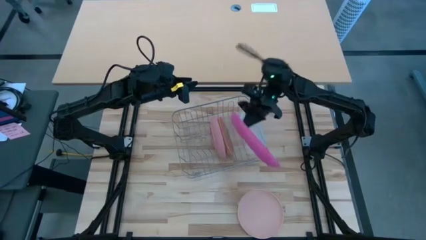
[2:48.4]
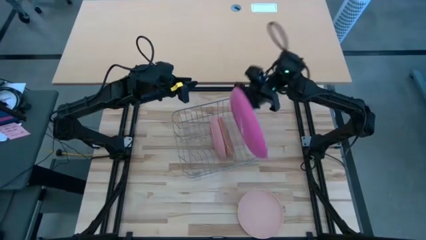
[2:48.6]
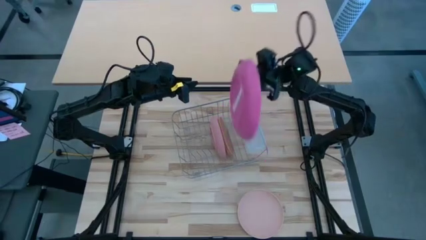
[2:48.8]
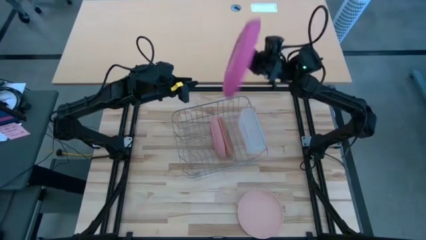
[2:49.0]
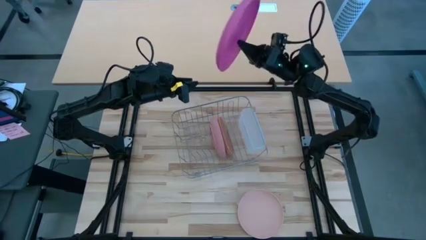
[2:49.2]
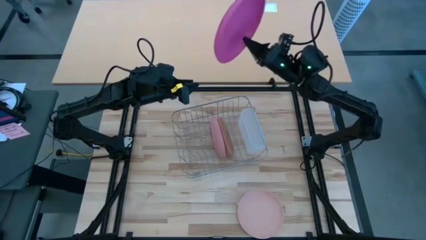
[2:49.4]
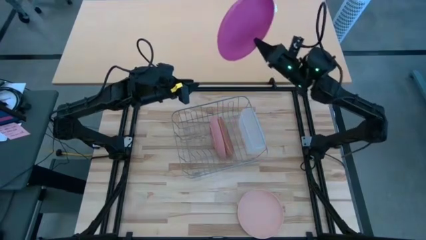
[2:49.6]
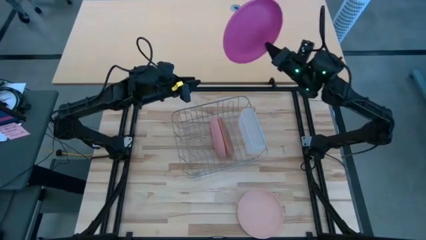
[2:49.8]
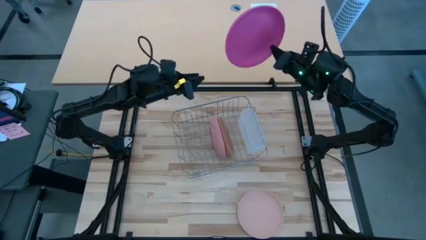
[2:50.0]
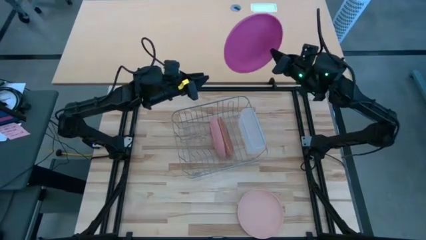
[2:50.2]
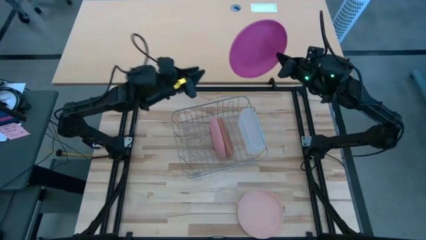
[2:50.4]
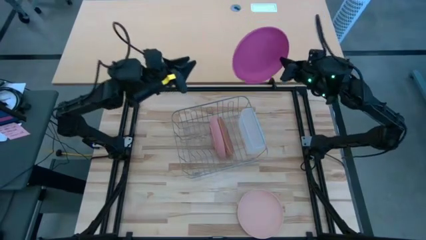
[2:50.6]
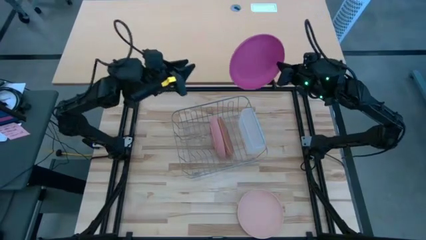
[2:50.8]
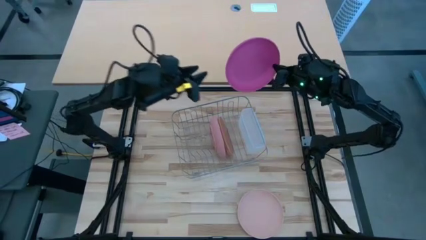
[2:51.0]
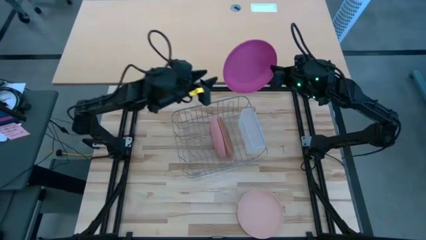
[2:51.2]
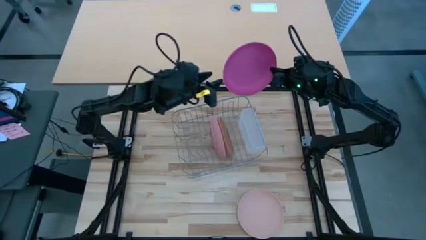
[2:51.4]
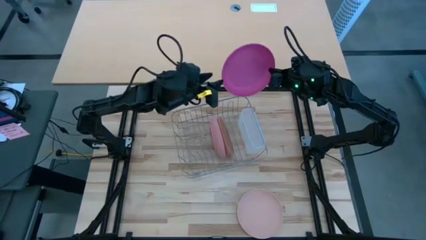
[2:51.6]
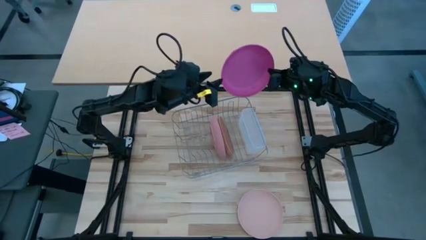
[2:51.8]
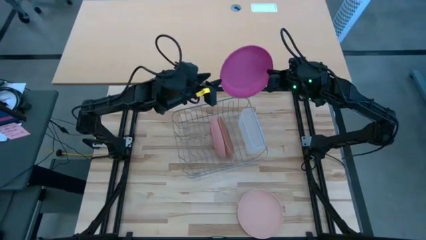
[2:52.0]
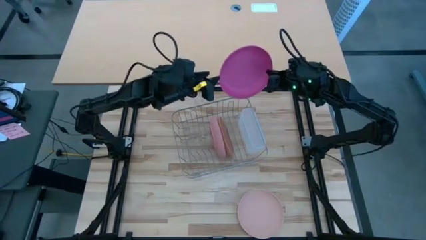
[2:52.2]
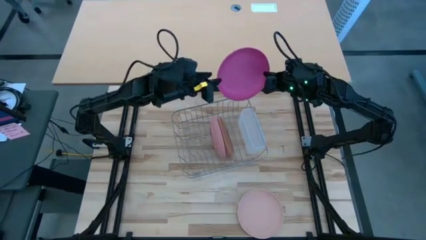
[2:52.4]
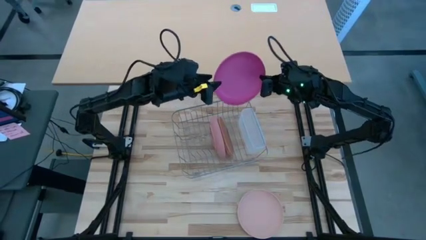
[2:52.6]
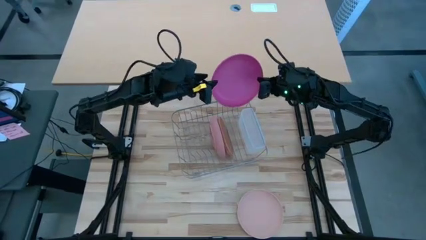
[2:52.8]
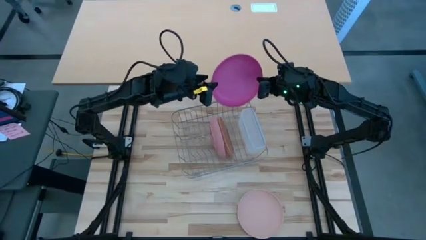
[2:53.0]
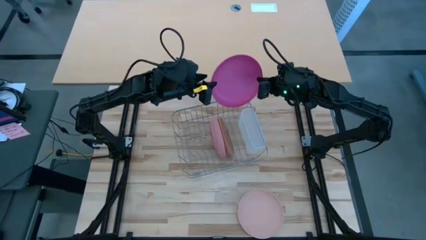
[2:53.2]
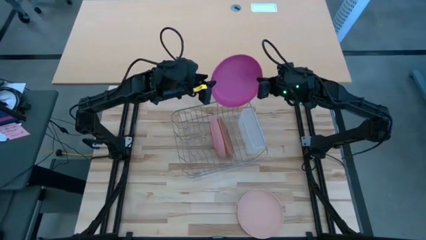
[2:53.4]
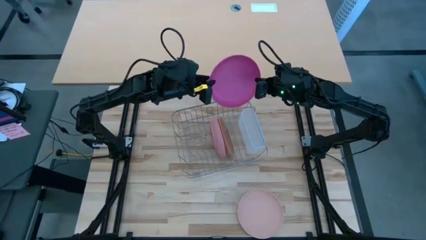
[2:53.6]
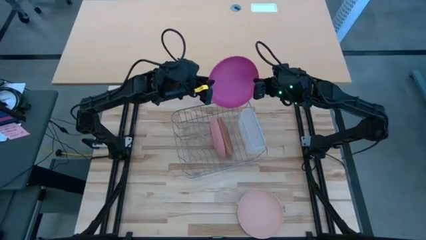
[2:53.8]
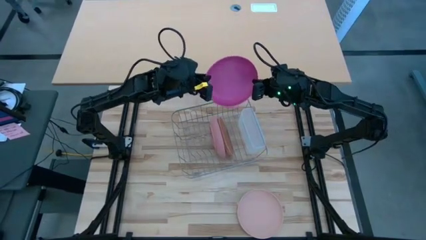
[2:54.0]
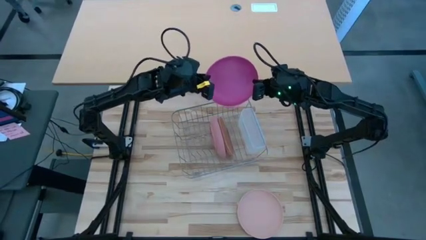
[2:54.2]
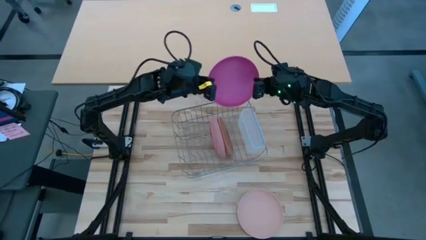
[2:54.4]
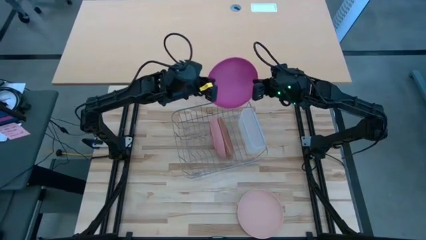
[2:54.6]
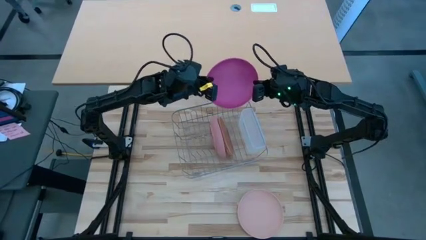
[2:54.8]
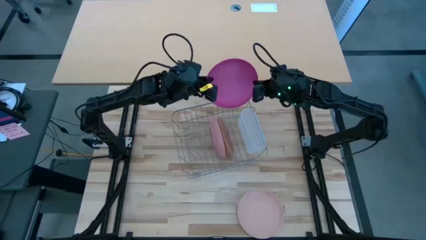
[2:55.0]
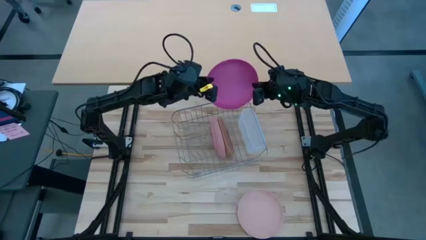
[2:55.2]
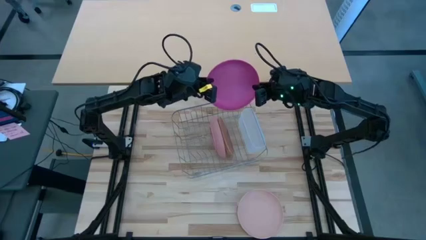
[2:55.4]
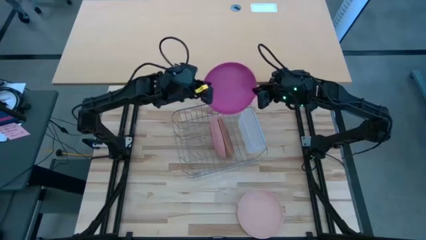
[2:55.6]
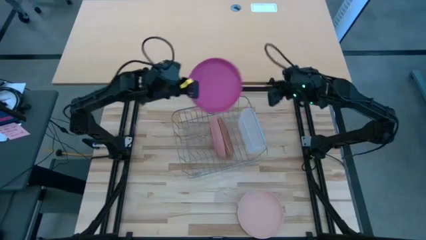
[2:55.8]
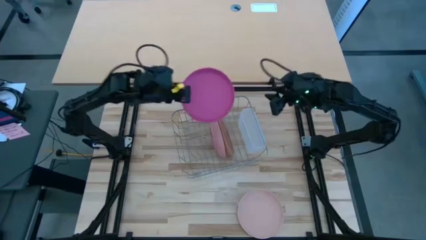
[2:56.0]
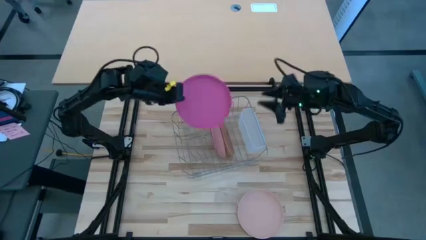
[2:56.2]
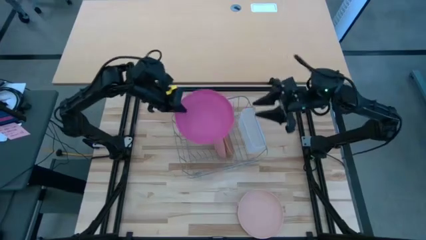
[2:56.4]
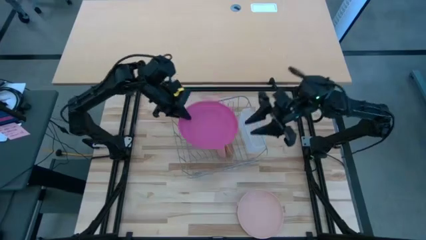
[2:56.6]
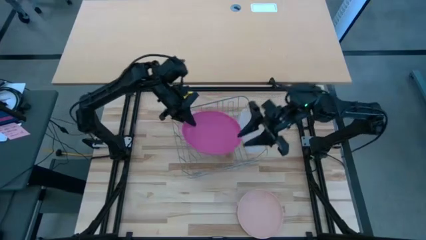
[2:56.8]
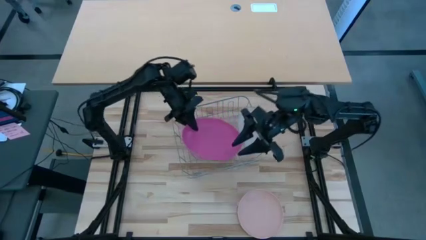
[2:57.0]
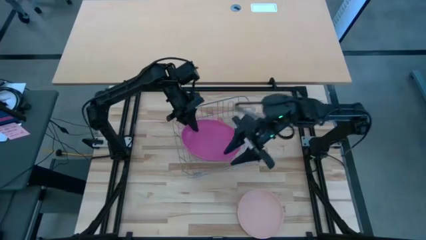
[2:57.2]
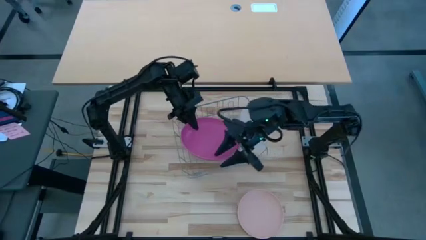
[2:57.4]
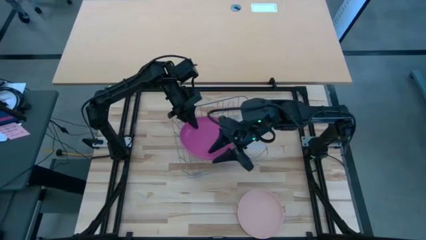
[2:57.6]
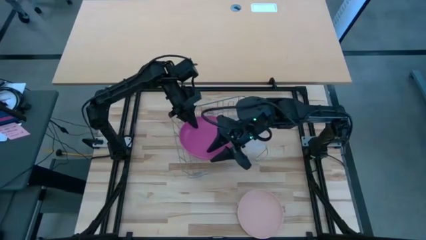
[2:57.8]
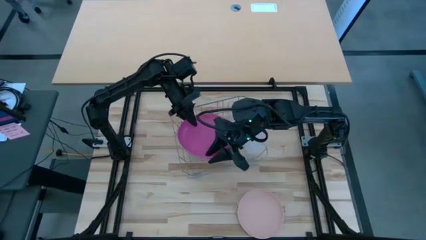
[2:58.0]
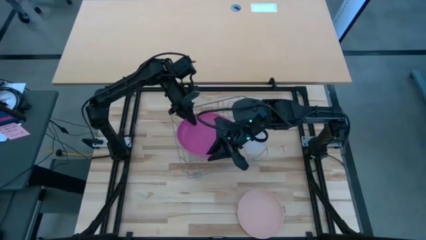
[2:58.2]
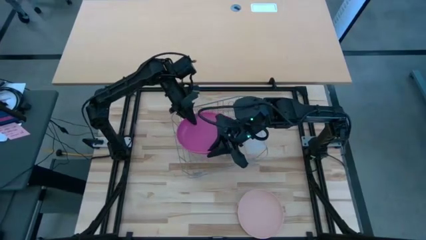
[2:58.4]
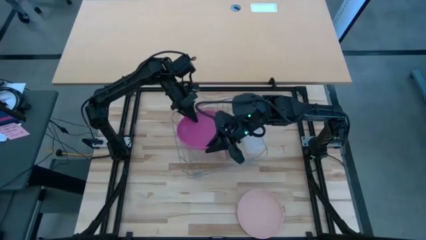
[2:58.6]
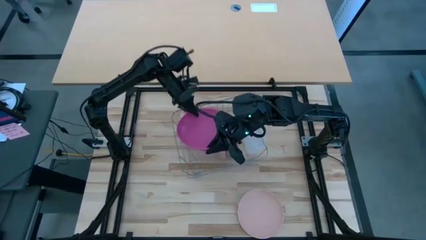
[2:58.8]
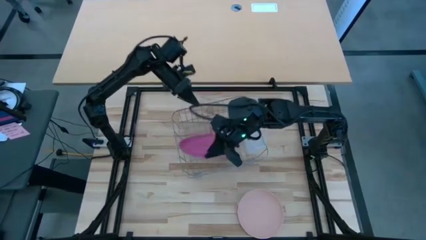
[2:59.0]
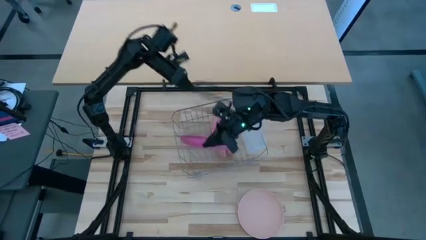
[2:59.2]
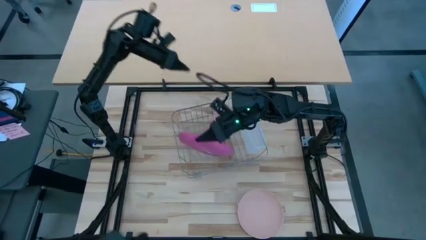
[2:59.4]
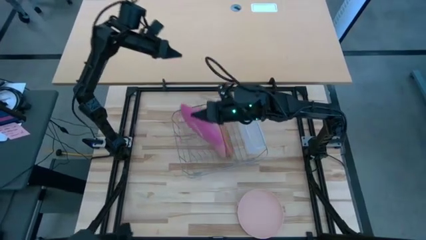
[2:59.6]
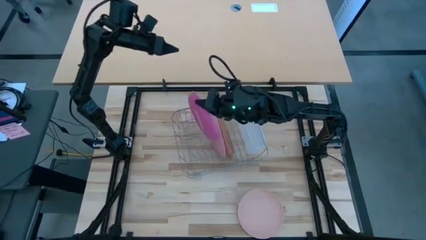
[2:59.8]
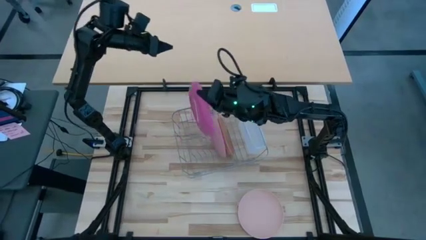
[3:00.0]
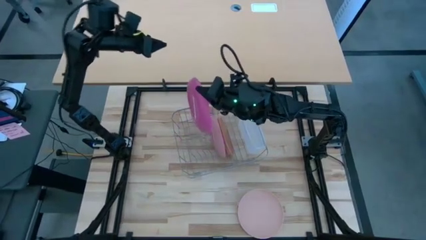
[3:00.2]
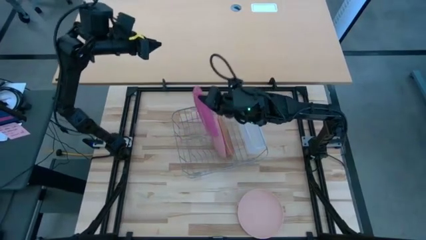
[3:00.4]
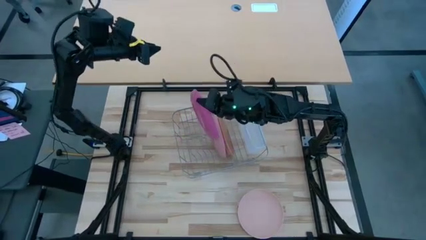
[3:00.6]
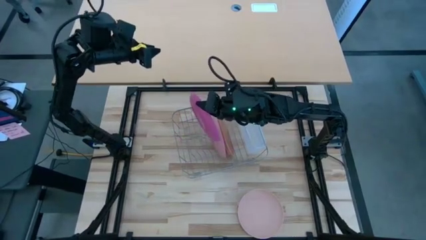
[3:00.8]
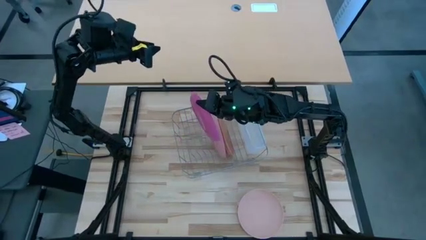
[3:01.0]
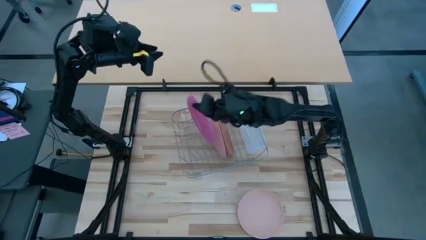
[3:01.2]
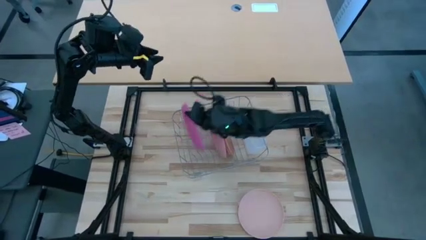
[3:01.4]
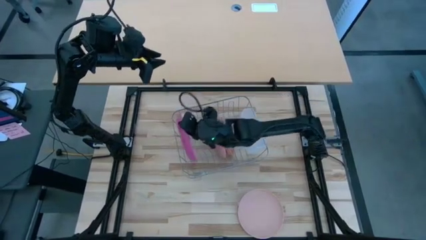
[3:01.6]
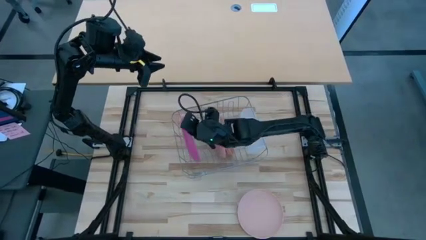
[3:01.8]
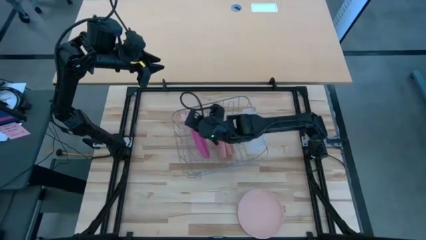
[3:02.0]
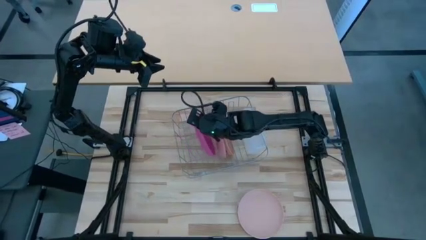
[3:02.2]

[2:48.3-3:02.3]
Task: Sort dishes
Put the pink plate in the dish rack
